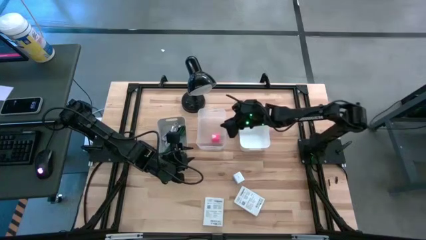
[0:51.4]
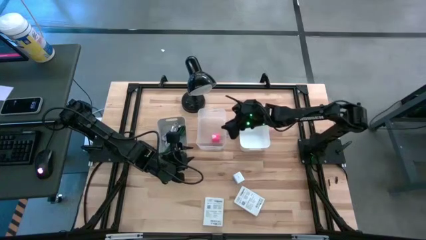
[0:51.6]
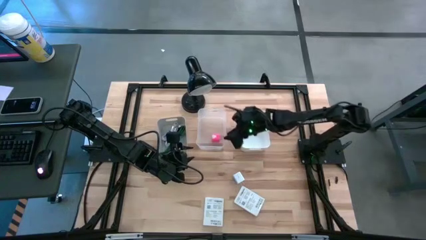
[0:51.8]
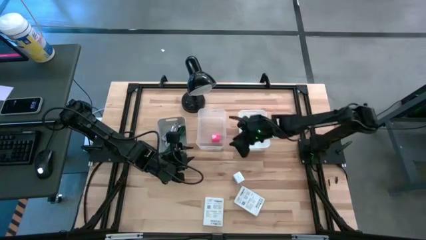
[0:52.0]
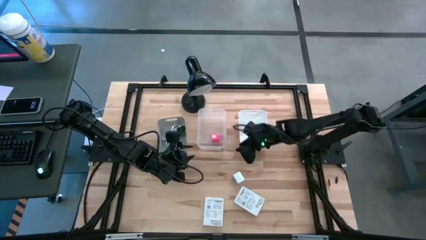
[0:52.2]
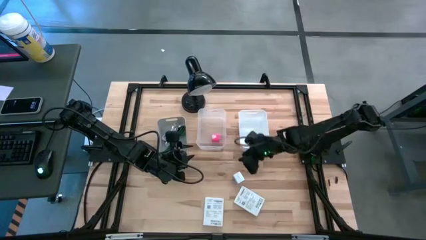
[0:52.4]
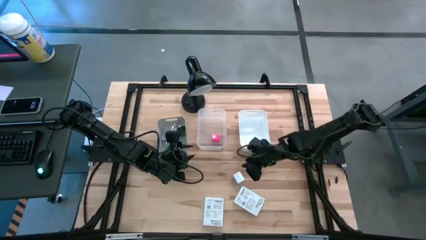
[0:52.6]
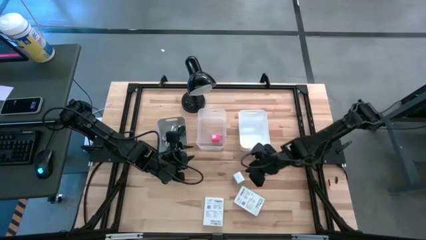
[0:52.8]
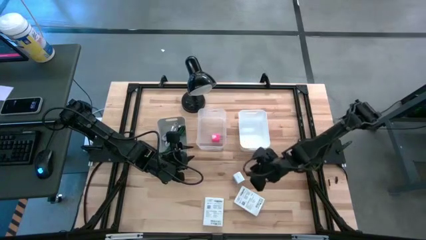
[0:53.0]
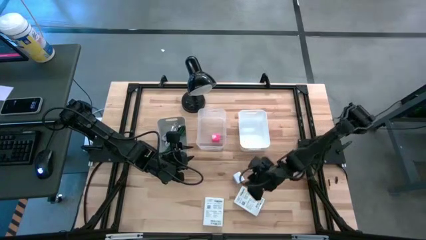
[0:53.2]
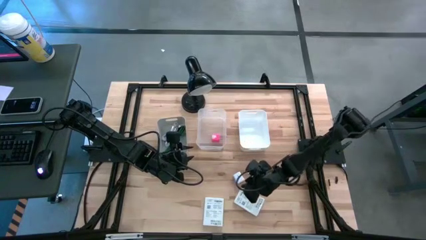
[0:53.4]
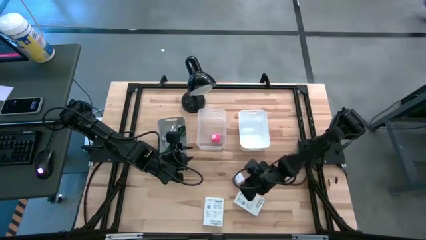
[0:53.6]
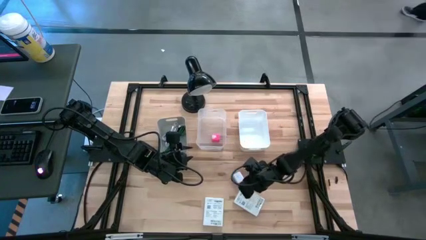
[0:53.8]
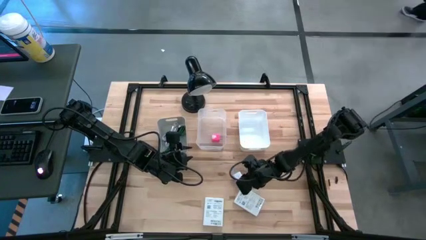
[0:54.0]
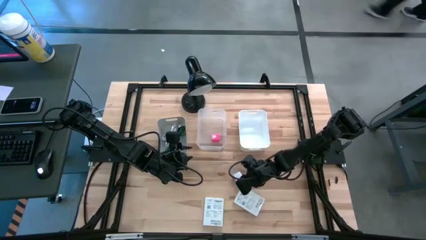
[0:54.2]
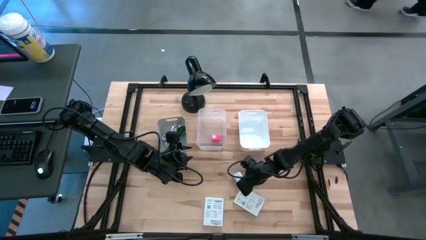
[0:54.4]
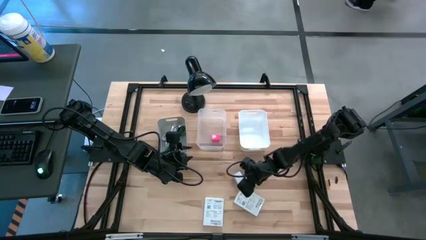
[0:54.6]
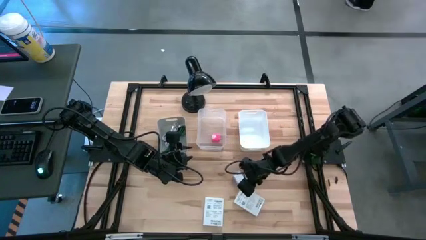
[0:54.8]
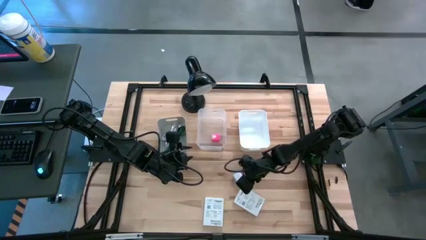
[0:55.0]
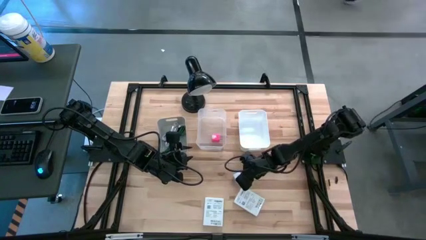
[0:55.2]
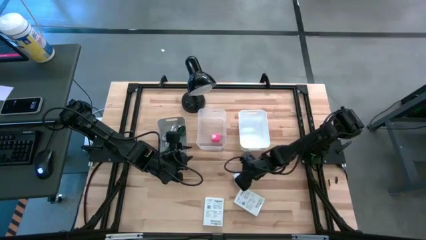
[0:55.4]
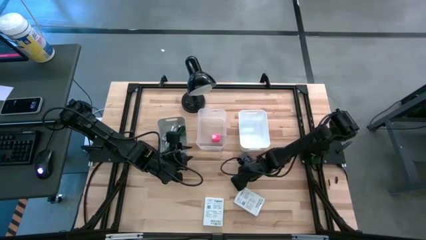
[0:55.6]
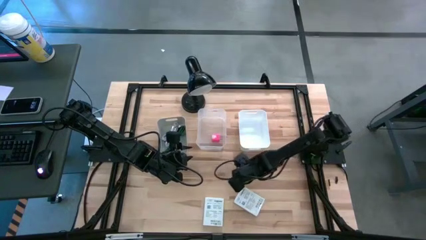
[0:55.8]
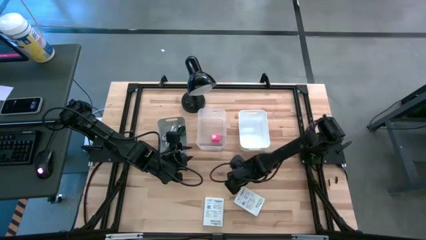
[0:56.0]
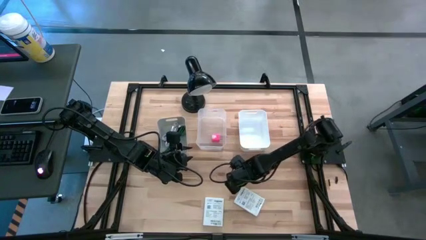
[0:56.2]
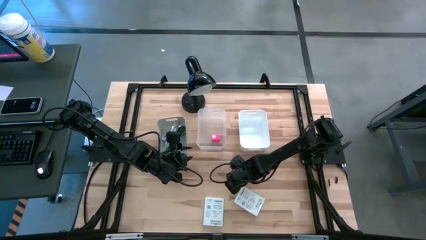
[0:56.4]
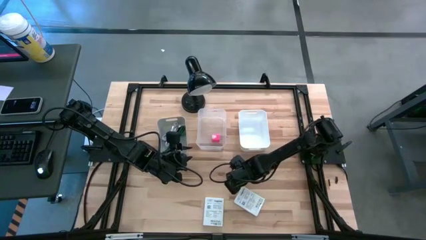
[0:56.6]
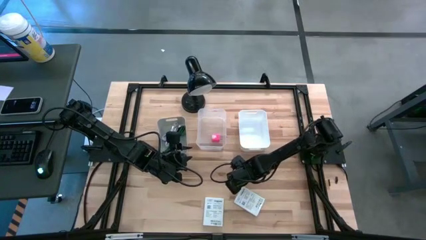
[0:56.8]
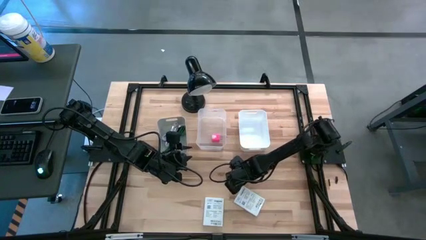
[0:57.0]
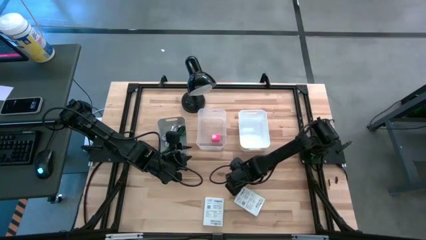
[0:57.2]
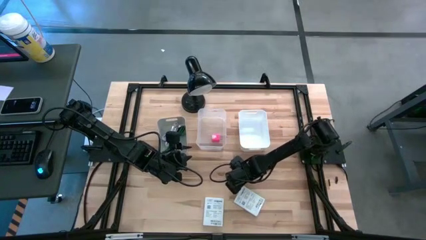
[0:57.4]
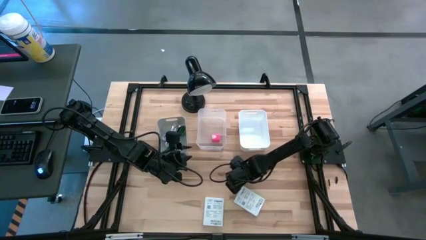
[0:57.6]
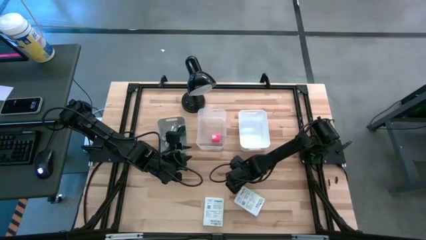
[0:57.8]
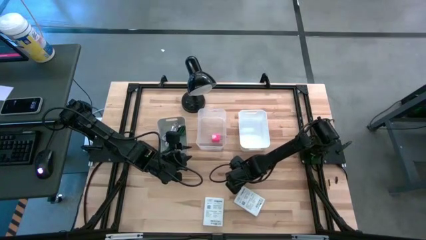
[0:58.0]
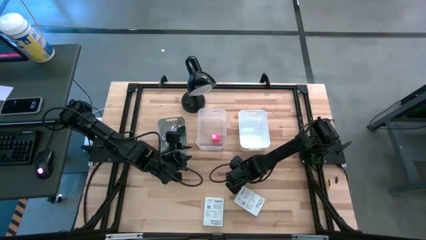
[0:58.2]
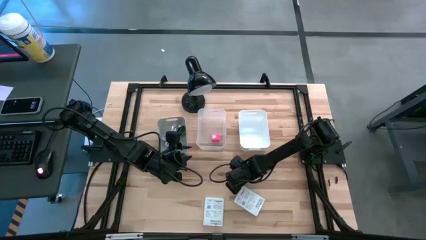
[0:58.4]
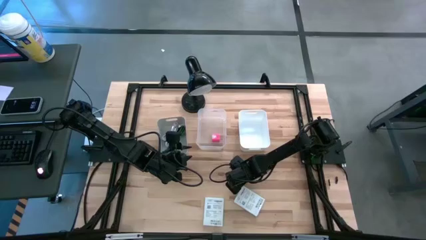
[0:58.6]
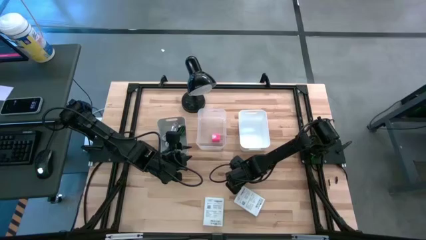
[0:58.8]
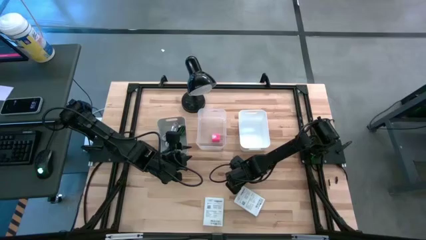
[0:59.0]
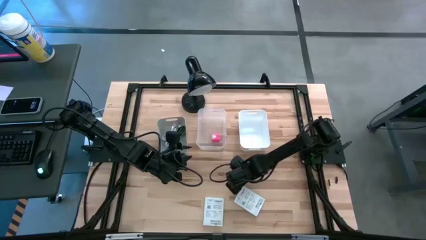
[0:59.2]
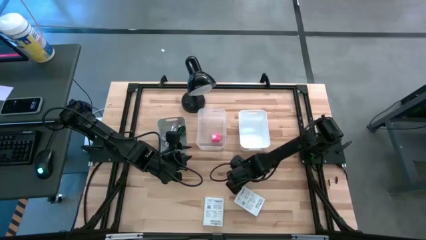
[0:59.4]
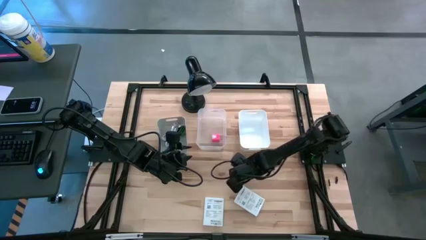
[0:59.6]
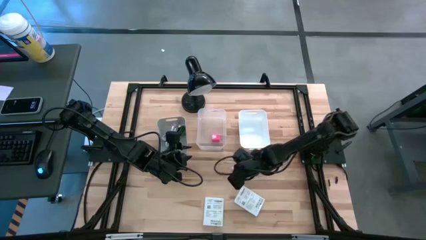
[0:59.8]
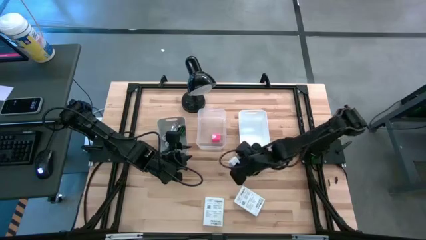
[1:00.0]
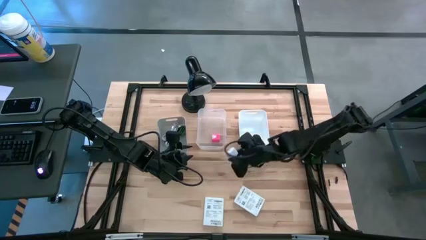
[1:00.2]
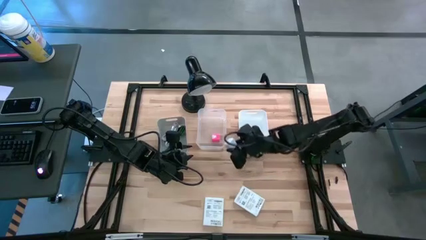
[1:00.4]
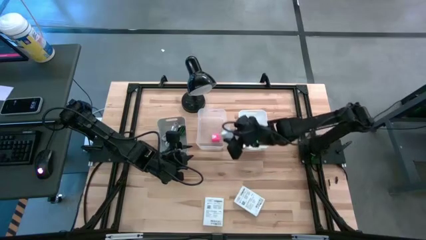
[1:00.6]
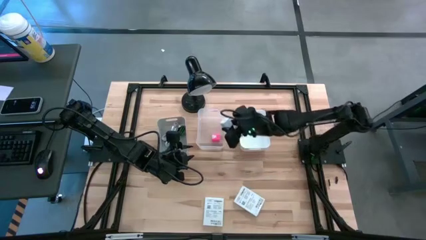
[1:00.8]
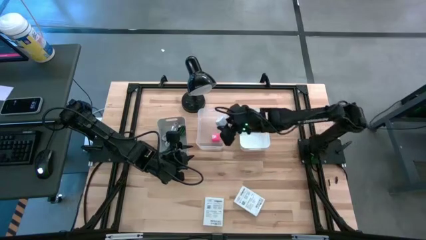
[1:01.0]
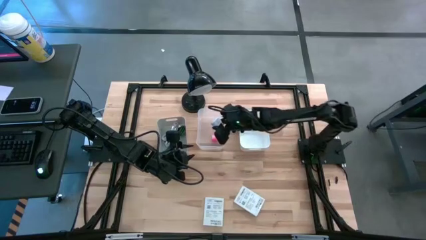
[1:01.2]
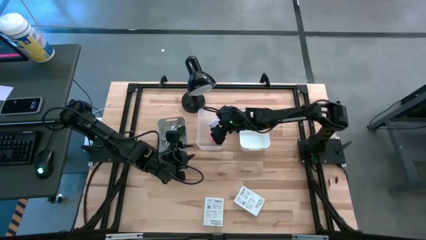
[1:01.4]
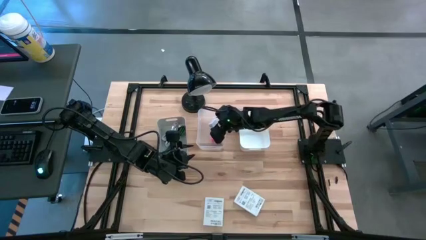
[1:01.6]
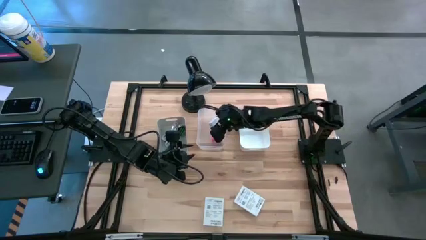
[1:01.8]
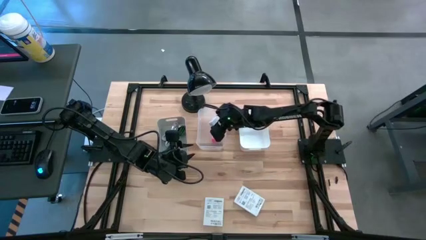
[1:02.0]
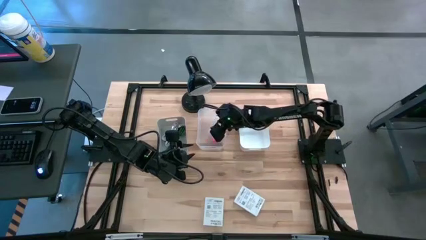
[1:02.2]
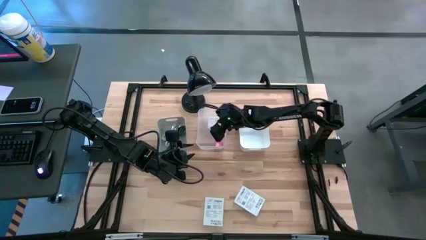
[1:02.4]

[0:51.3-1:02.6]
Task: Pick and place items into bin
Put the white charger adapter into the transparent bin

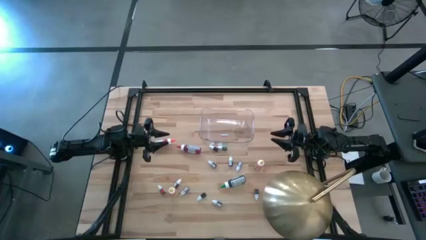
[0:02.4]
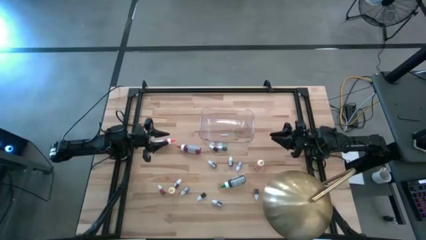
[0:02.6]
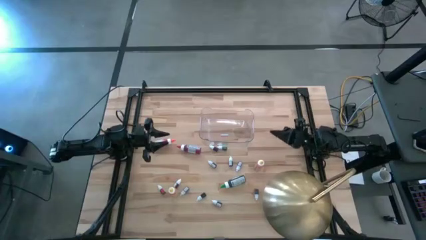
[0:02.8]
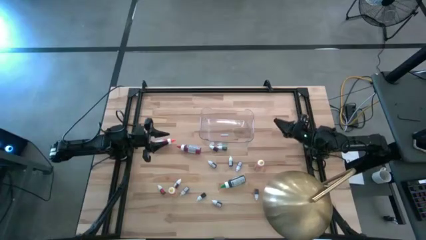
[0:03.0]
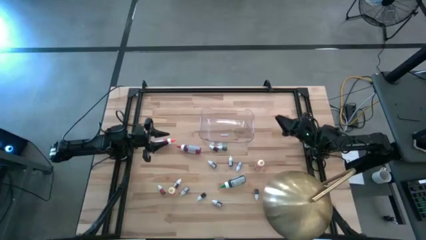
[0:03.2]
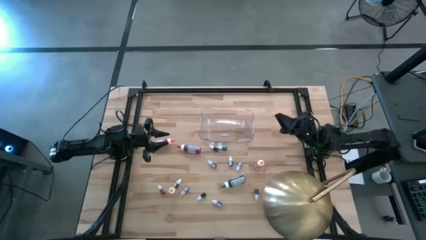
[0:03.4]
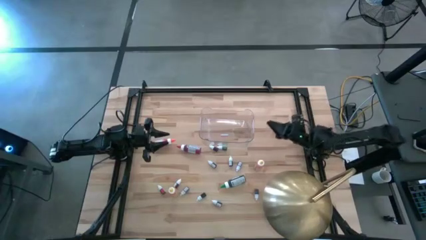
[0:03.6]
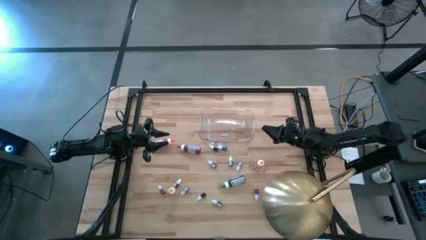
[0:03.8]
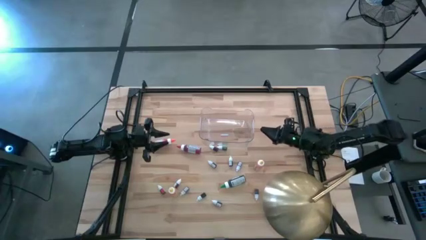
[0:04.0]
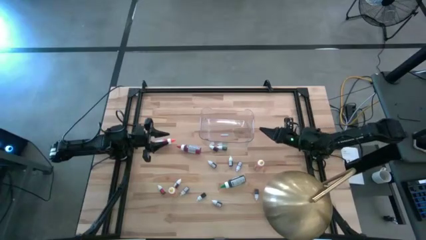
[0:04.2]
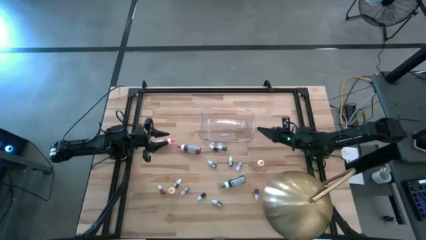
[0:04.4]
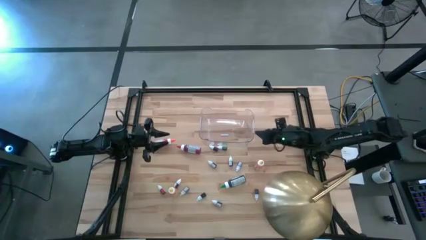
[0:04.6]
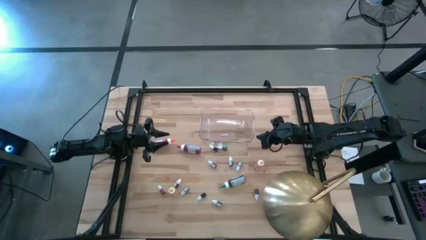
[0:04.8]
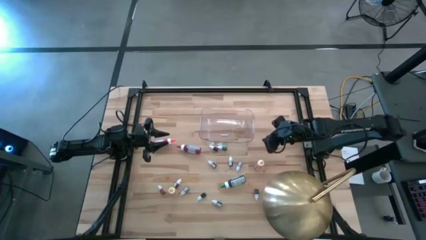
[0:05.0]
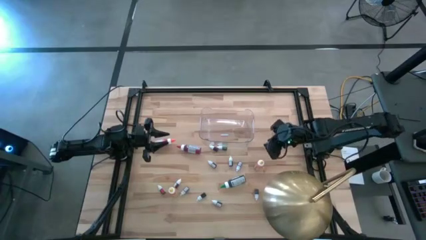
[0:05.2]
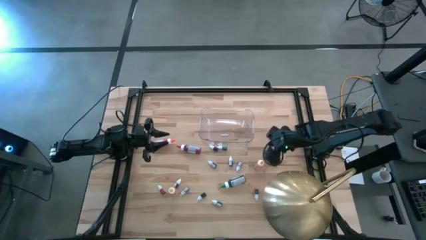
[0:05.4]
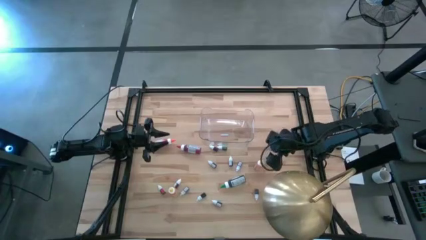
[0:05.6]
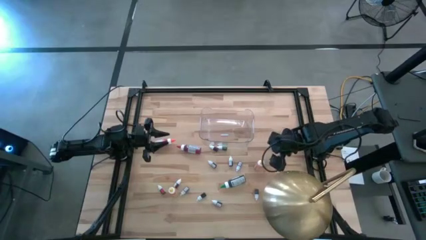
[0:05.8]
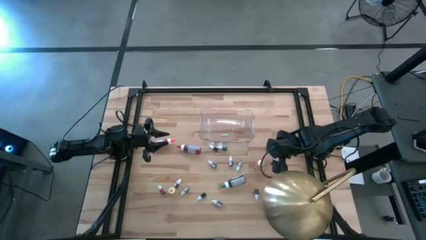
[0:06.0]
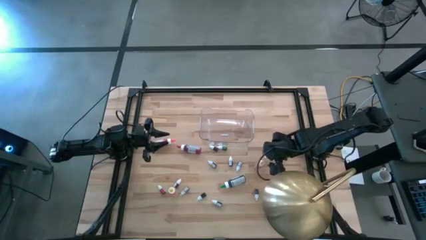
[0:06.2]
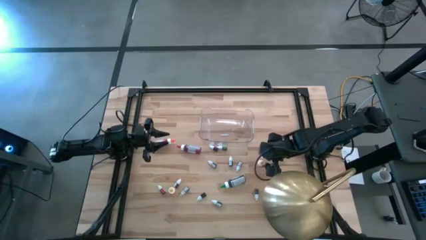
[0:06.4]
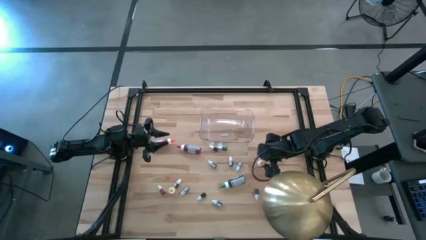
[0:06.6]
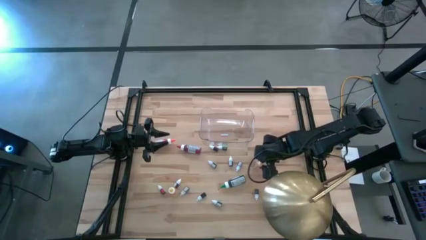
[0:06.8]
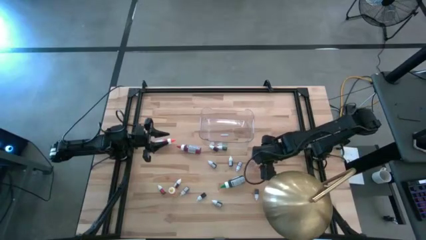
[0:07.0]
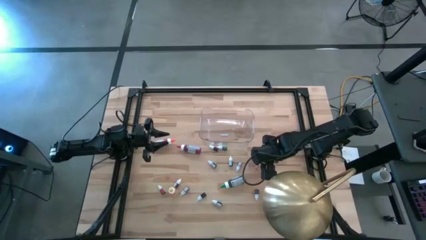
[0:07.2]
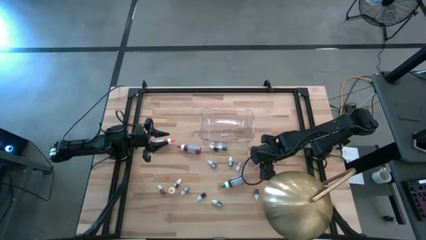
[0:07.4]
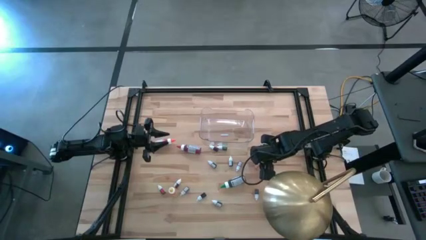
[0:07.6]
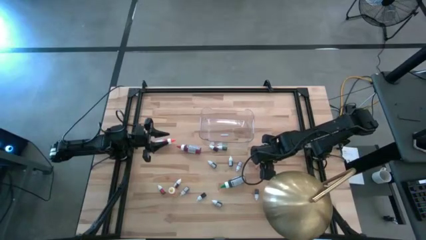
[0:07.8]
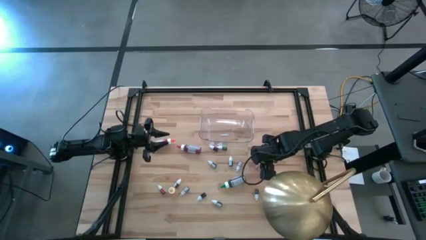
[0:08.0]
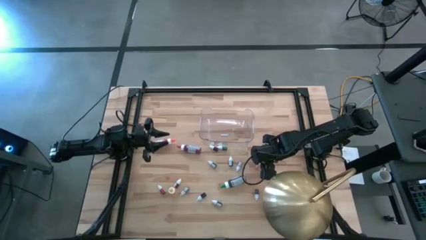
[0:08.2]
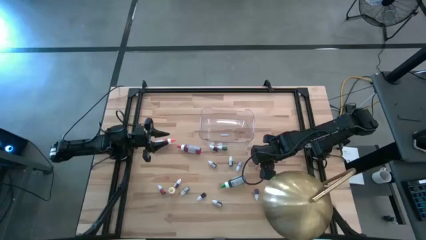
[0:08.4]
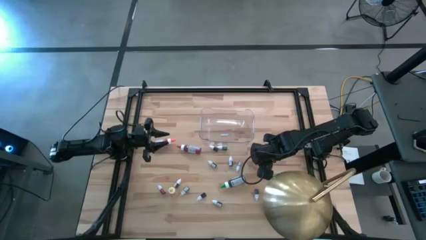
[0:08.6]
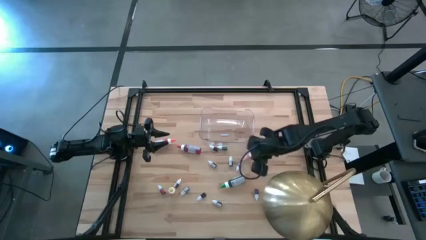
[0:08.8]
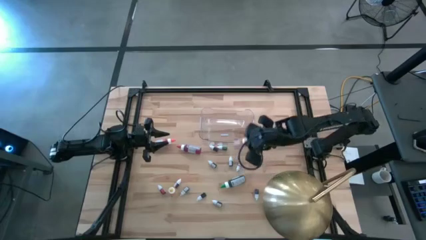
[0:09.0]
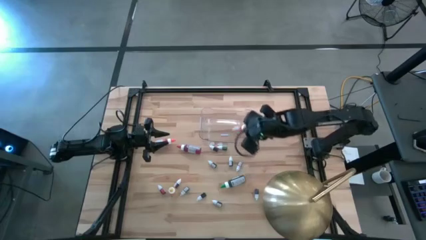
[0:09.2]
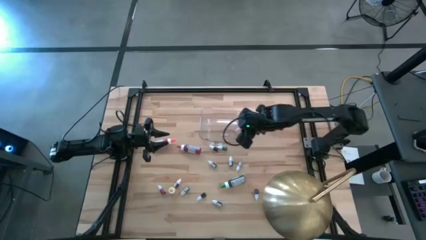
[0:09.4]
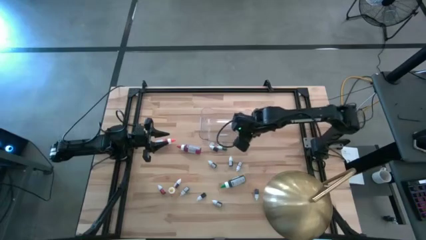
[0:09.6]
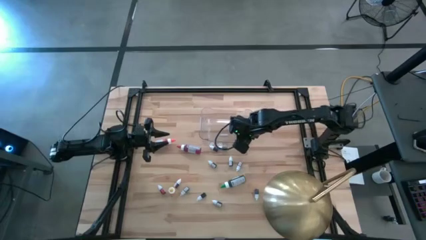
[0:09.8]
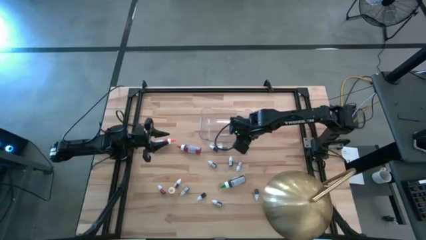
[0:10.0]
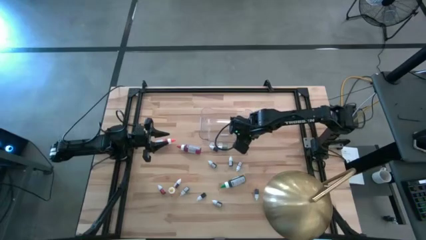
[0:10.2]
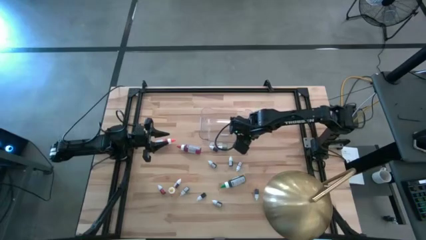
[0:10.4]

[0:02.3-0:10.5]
Task: Pick & Place food coloring
Put the right large yellow food coloring bottle in the transparent bin
